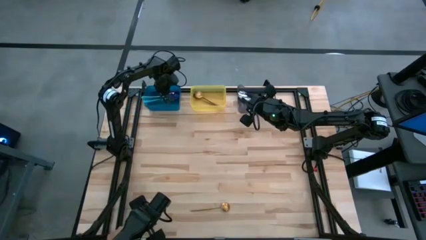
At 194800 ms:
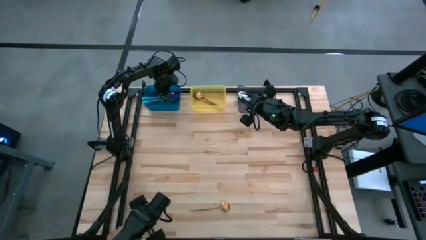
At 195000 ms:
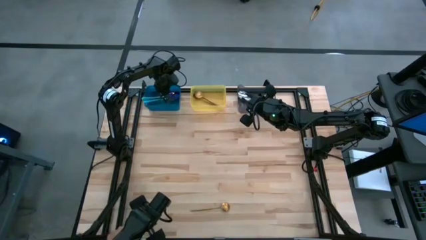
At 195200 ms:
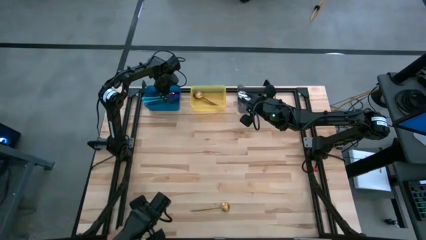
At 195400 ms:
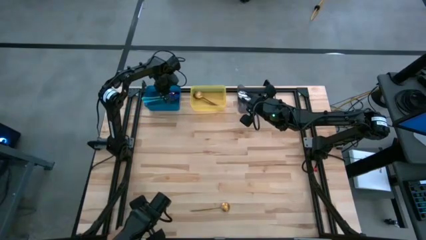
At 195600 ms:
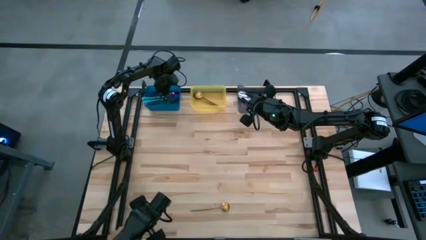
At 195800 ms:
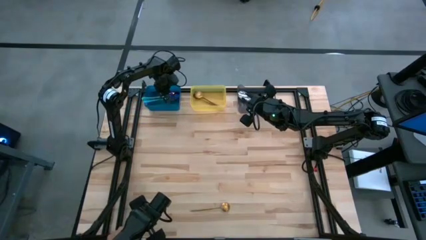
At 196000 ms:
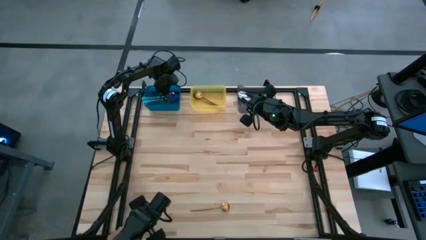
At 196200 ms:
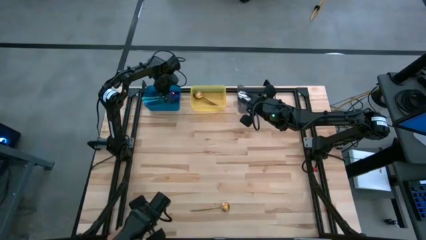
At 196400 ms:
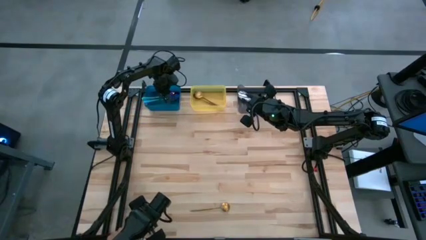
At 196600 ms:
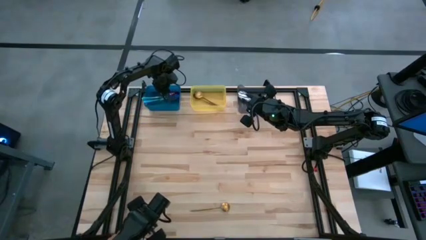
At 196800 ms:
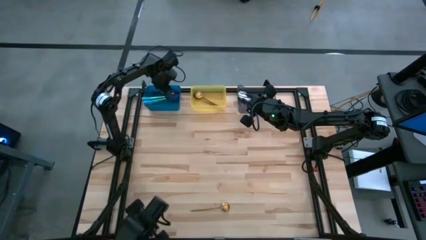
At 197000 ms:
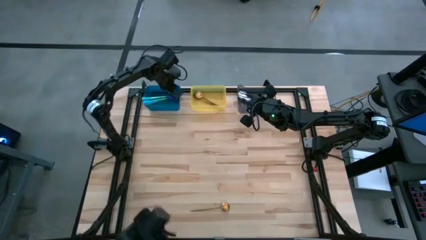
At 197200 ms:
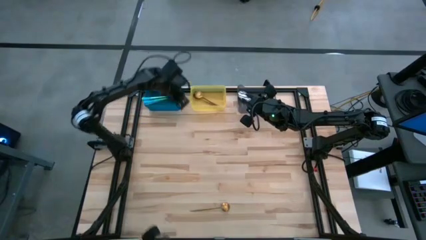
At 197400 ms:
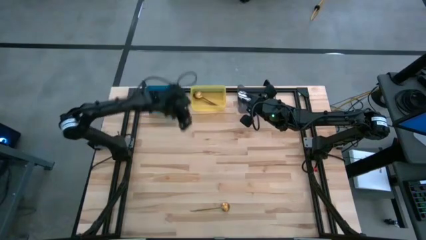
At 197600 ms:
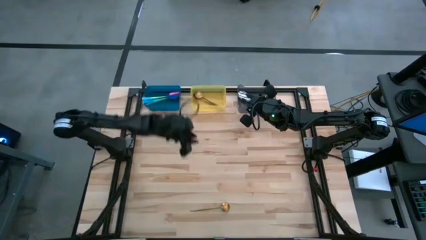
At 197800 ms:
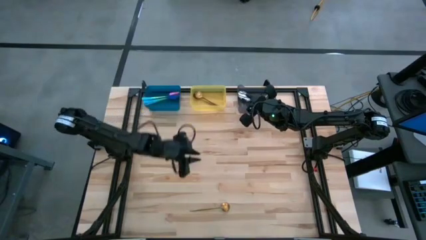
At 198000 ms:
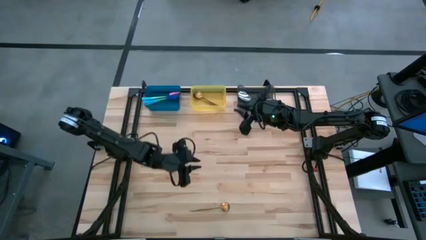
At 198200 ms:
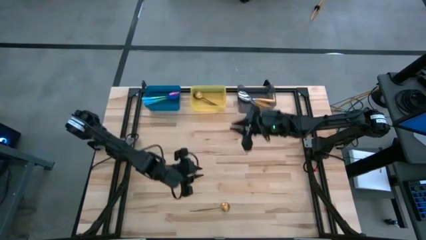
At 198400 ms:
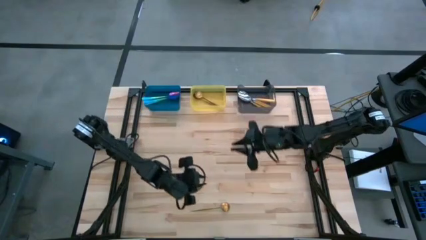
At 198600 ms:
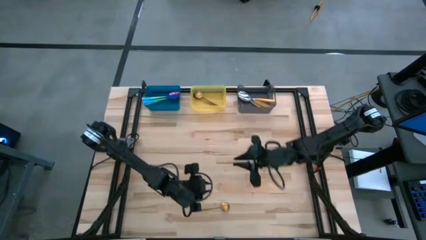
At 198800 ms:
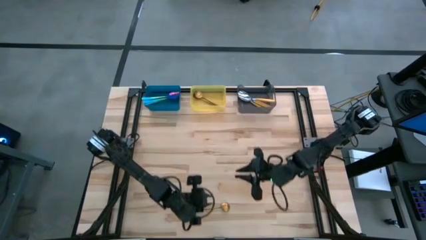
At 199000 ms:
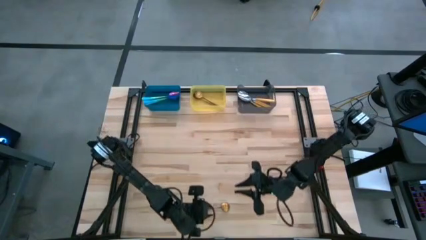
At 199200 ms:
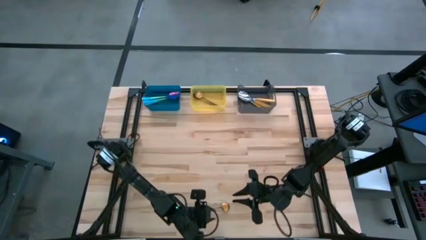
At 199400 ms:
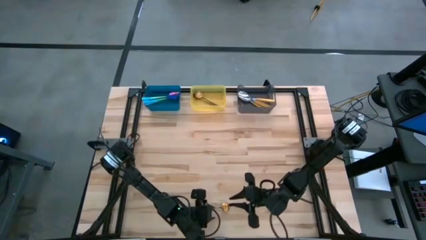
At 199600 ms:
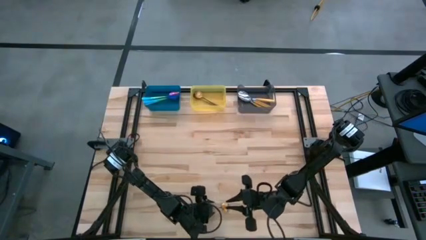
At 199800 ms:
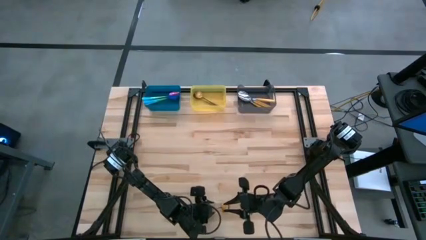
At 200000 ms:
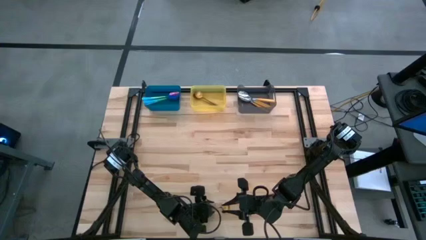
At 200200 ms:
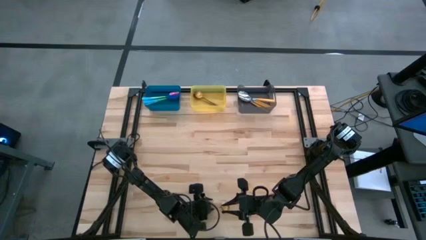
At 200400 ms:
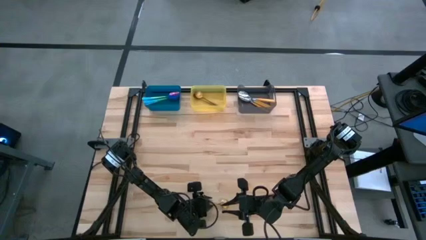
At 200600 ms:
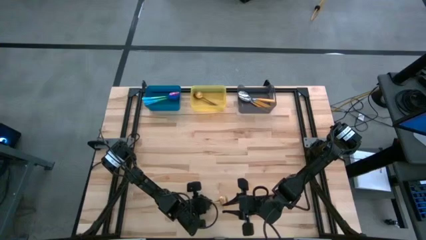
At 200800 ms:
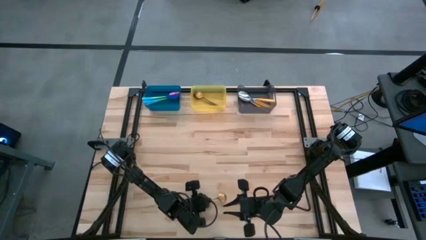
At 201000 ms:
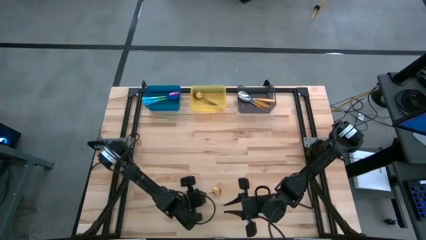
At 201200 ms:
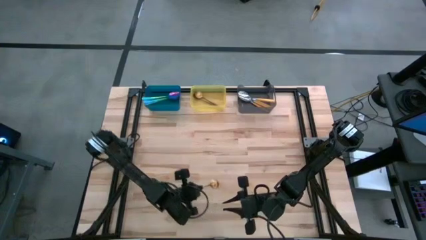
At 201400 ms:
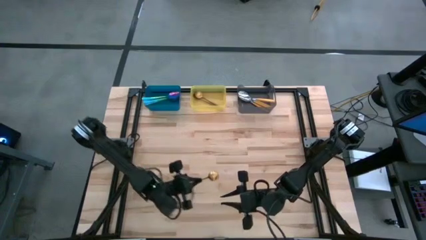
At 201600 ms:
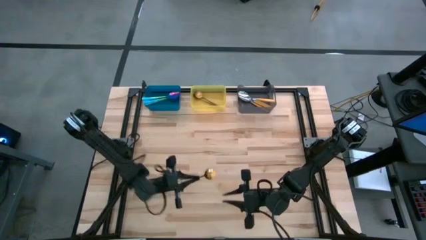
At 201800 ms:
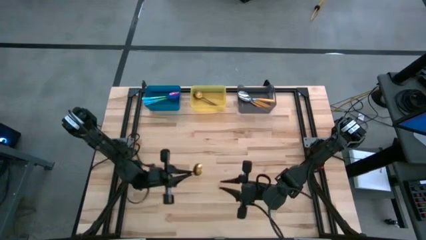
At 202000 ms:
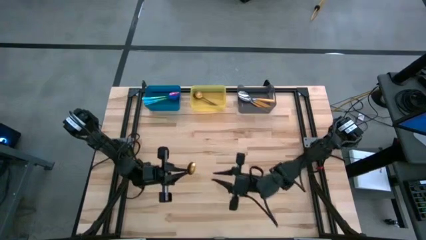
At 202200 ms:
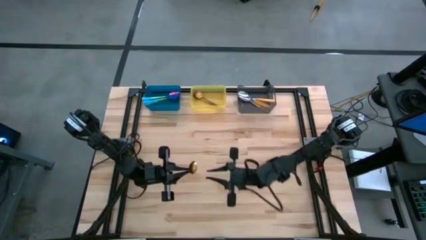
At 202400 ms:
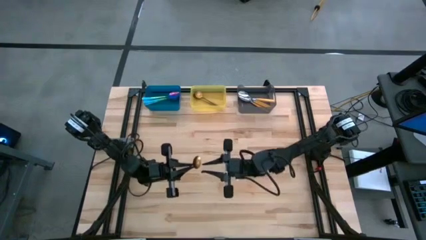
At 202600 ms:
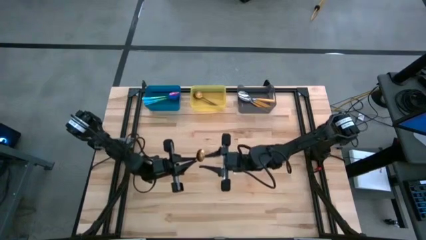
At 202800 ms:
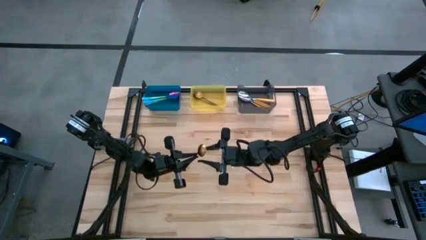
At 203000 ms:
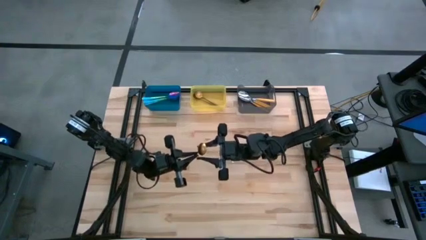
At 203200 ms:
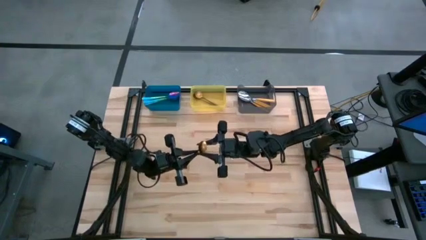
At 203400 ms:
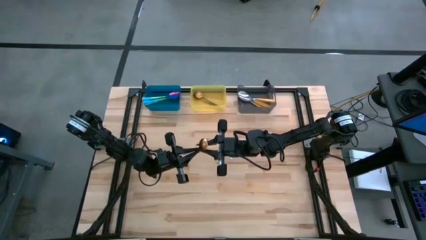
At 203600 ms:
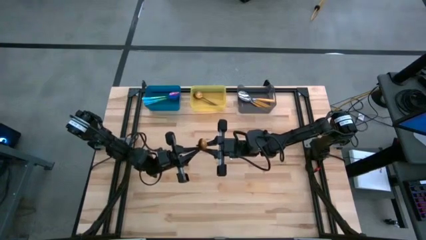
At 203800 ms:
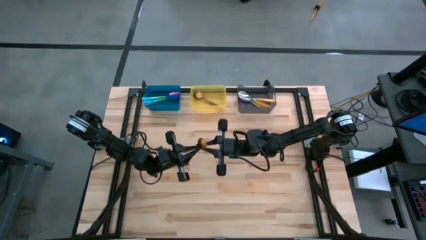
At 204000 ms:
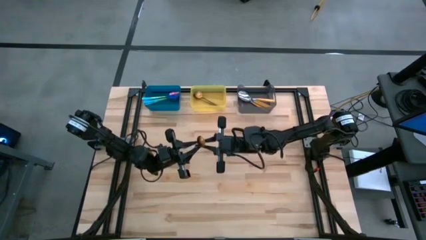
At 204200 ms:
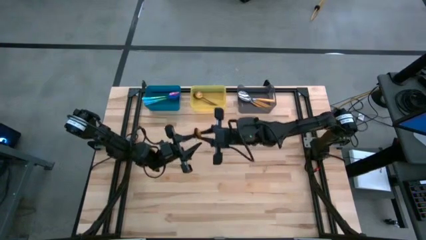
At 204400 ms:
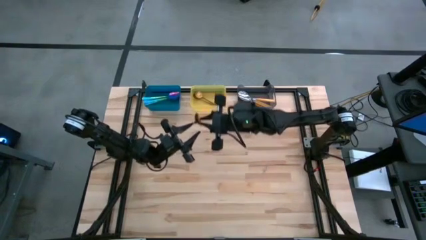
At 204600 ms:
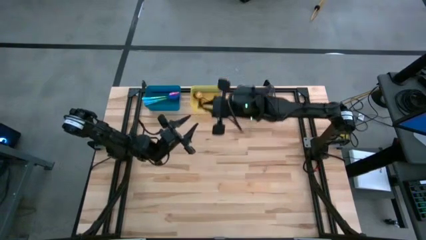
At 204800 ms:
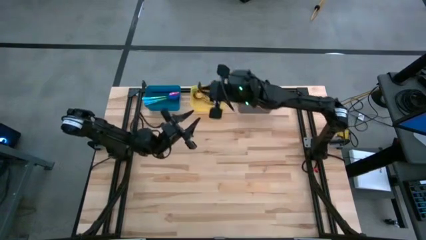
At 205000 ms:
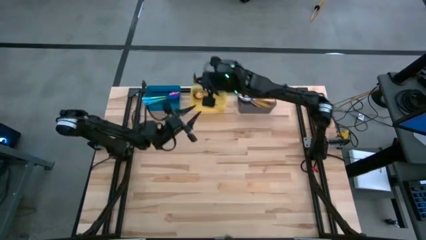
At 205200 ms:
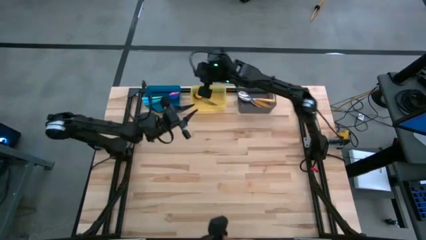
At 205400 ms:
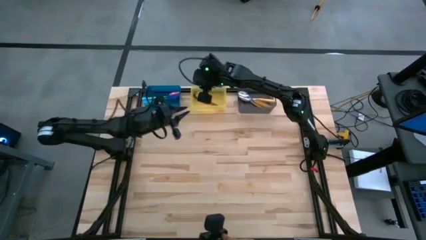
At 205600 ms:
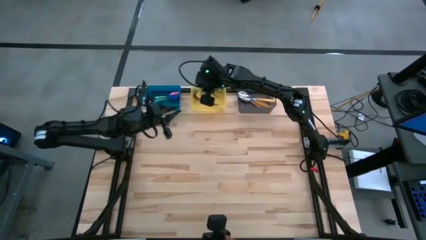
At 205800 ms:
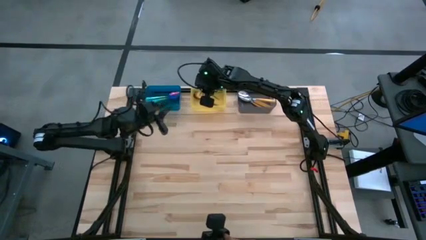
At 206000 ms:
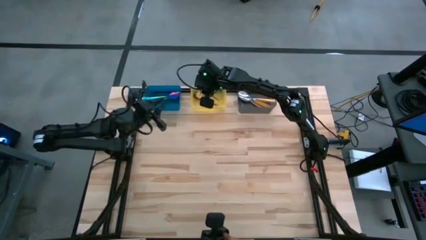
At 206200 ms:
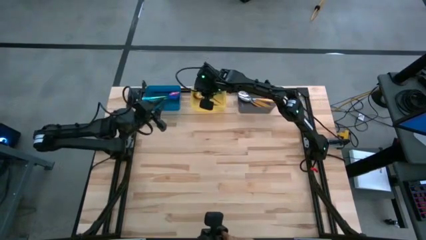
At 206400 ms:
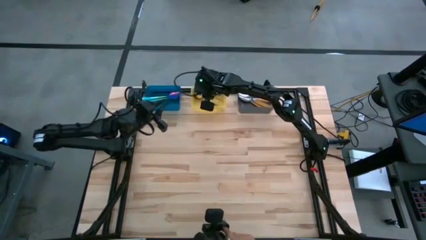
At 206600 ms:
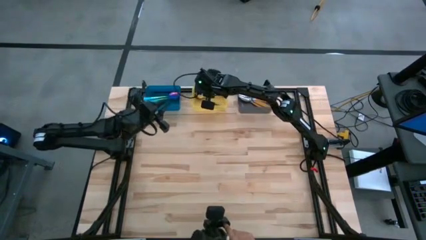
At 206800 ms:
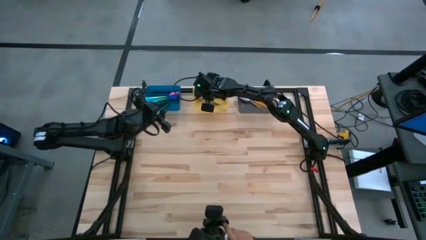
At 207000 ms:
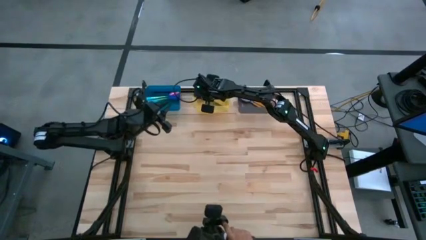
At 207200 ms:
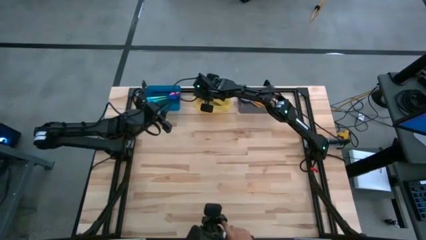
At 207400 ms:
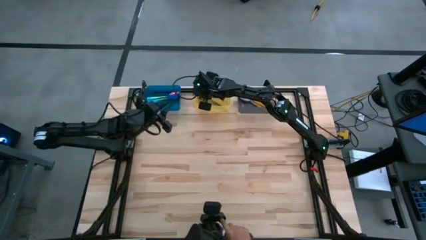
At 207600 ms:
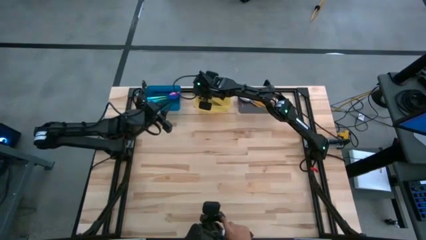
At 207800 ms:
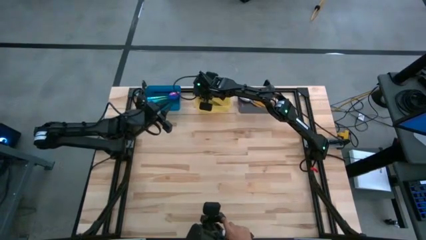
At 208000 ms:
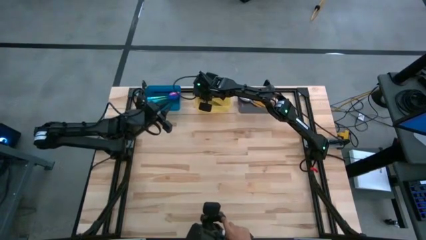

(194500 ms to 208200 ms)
Task: Sort silverware by color (type)
Put the gold spoon into the yellow bin

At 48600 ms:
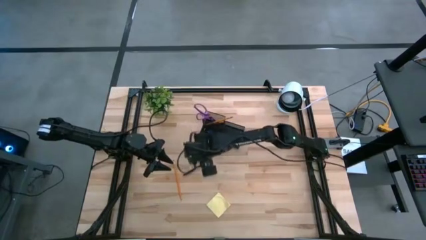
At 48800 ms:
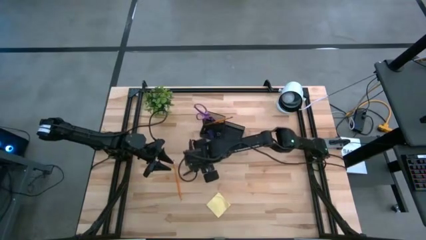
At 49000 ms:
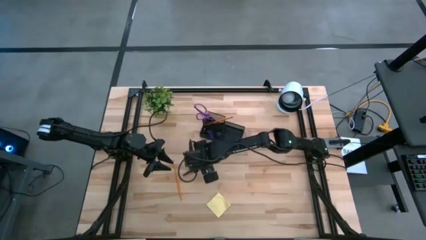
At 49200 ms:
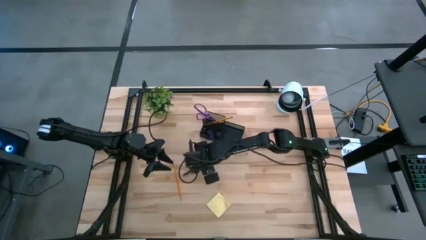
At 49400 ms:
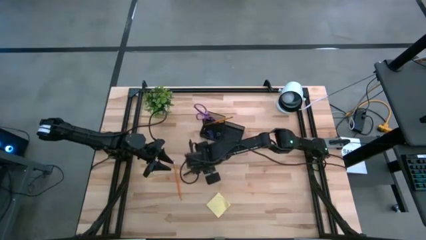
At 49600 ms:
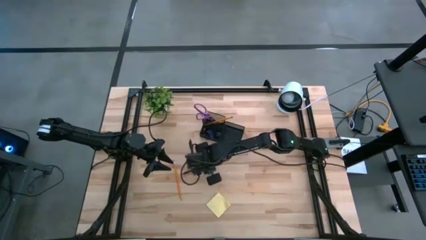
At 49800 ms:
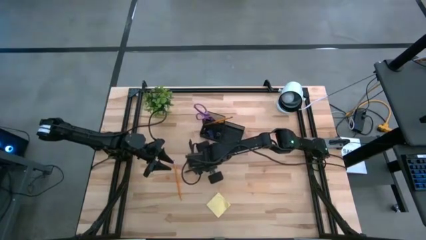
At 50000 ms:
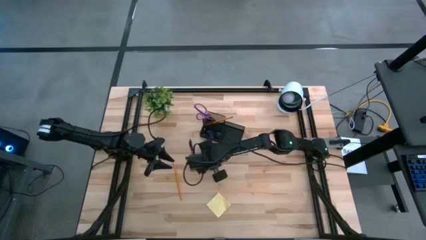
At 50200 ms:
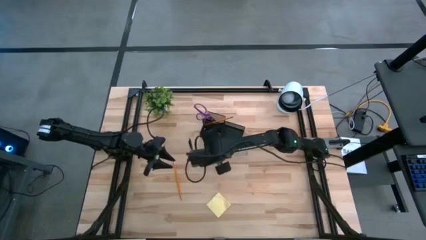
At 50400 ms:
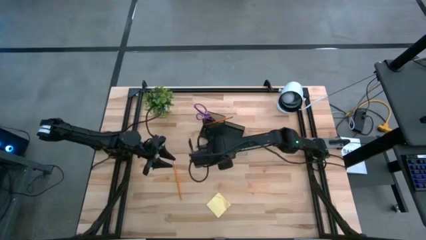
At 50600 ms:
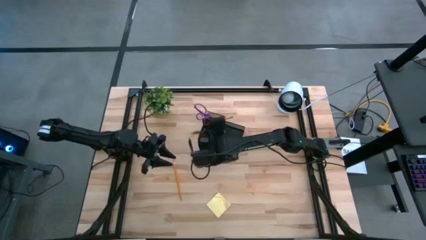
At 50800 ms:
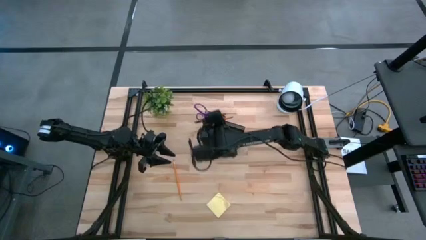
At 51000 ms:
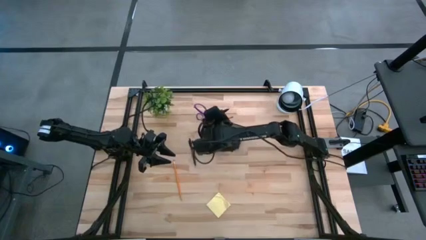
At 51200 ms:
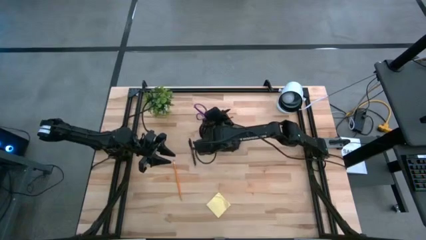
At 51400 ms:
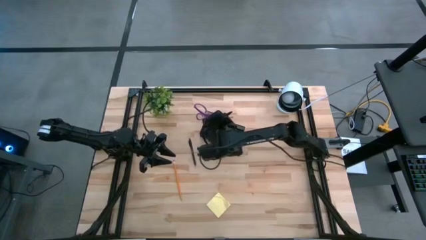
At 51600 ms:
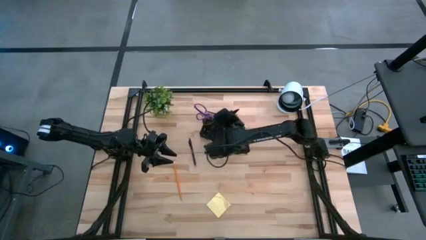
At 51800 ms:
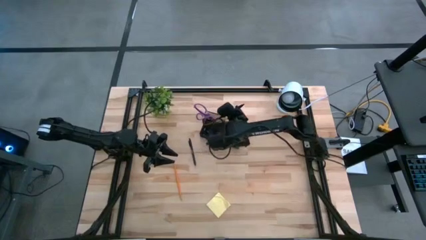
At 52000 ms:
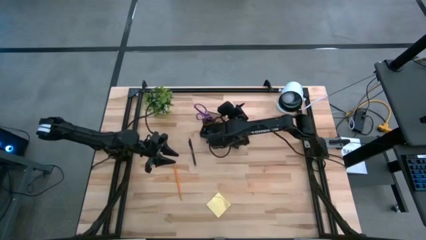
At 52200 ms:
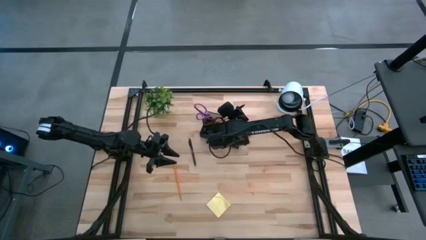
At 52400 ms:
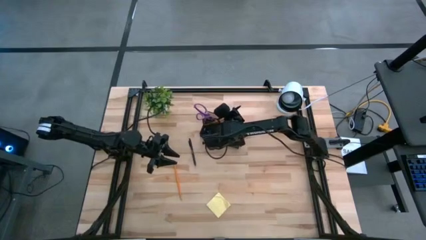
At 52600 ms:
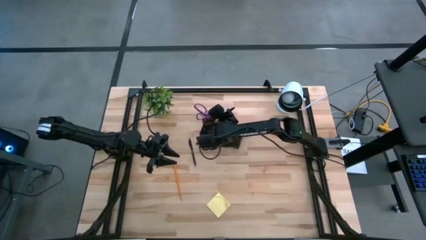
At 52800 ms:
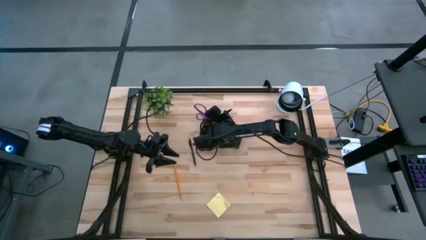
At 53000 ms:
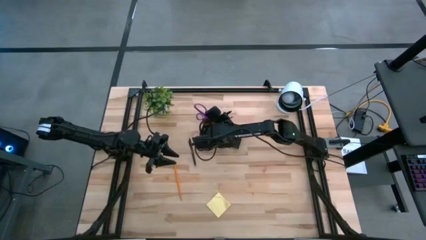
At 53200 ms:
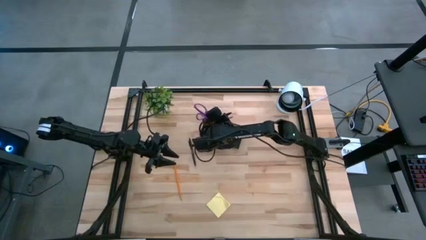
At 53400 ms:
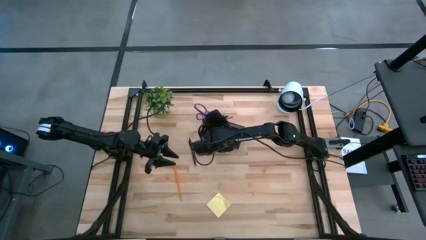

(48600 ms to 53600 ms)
Task: Pick and place office supplies into organizer
Put the bottom black pen into the black desk organizer
